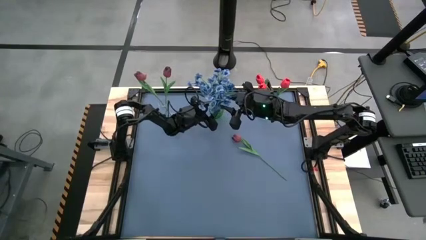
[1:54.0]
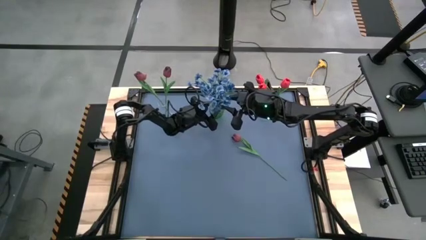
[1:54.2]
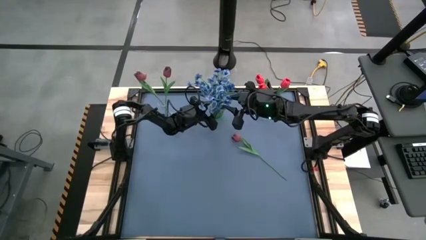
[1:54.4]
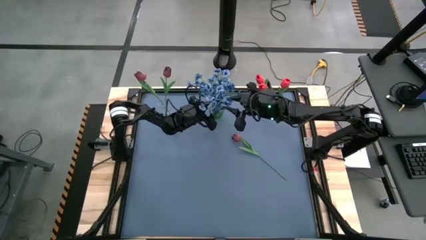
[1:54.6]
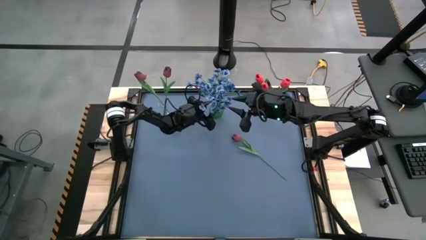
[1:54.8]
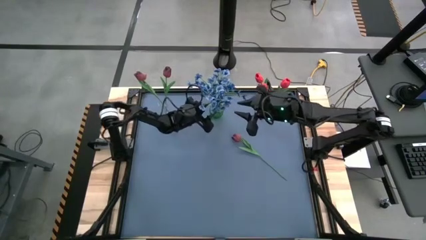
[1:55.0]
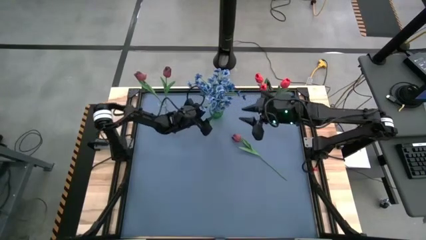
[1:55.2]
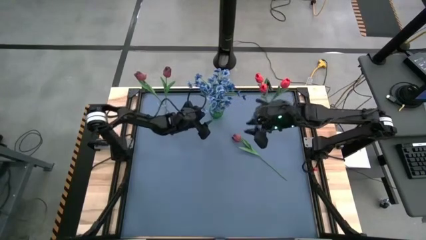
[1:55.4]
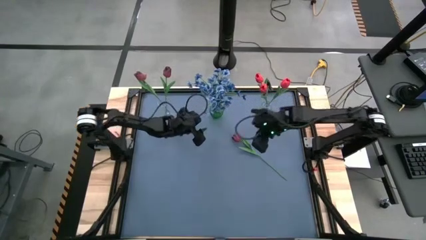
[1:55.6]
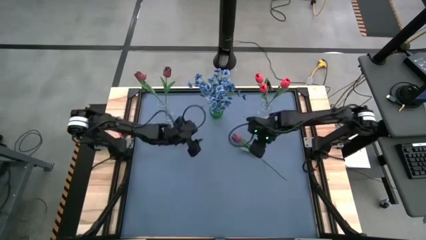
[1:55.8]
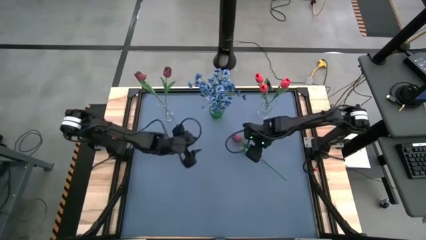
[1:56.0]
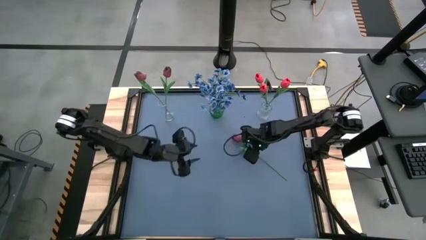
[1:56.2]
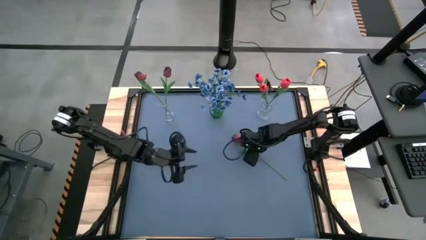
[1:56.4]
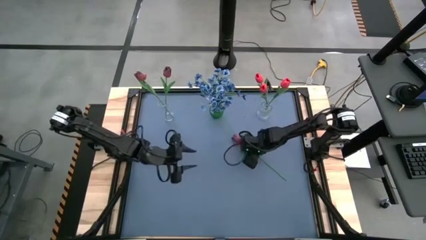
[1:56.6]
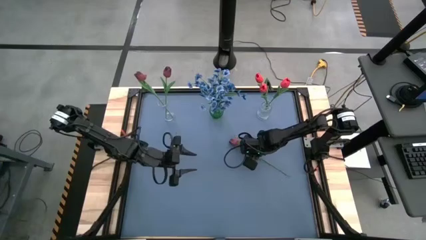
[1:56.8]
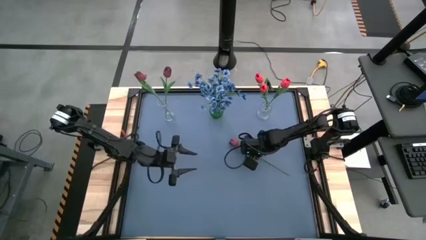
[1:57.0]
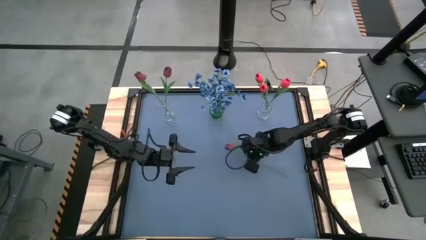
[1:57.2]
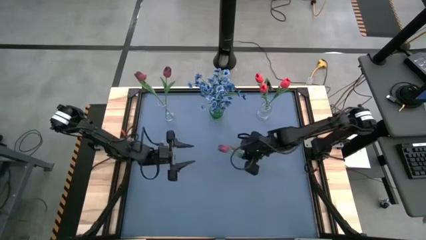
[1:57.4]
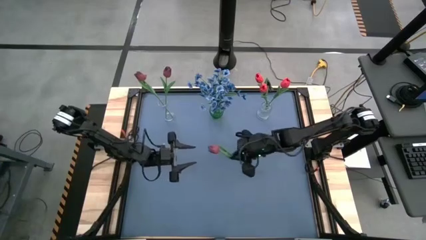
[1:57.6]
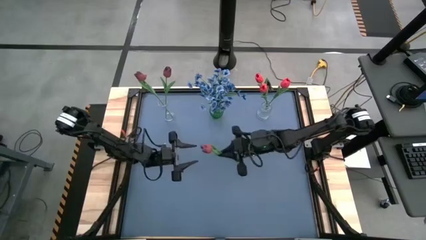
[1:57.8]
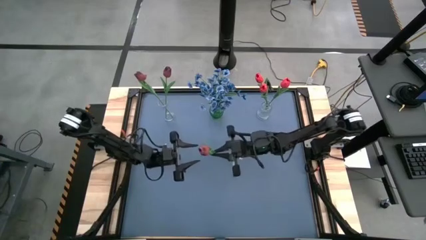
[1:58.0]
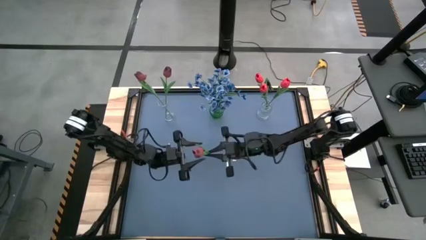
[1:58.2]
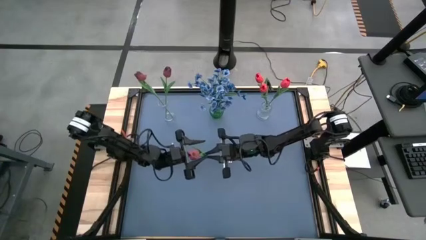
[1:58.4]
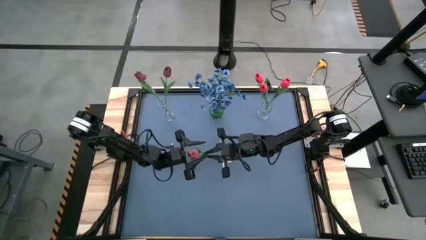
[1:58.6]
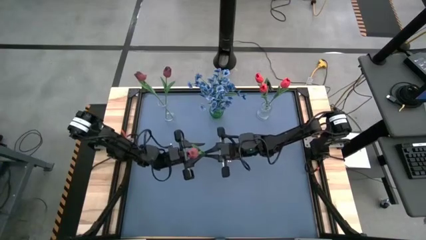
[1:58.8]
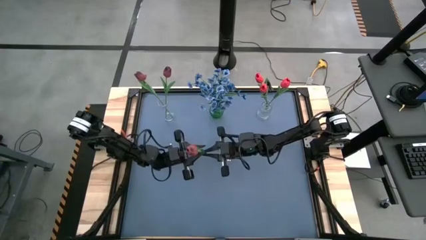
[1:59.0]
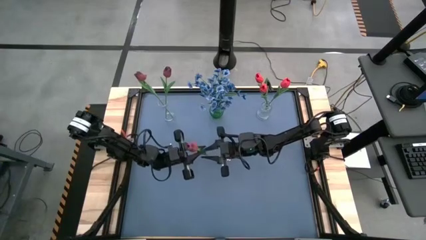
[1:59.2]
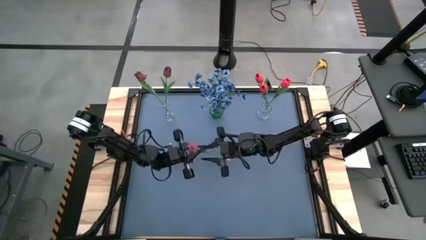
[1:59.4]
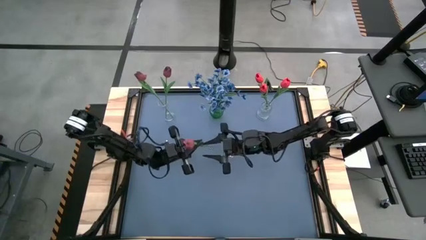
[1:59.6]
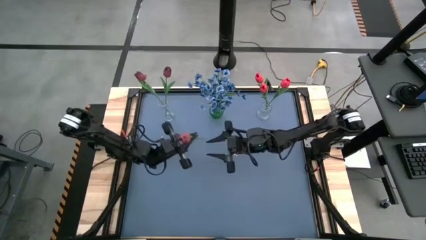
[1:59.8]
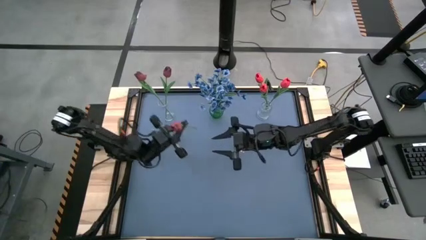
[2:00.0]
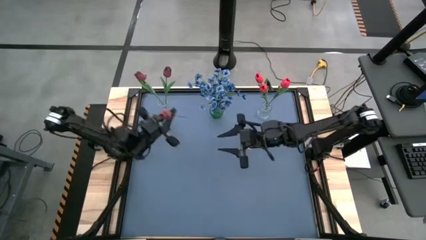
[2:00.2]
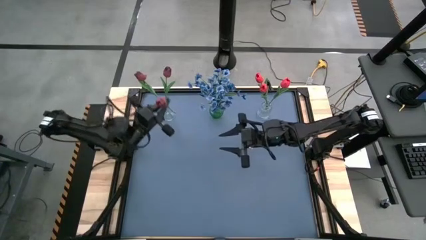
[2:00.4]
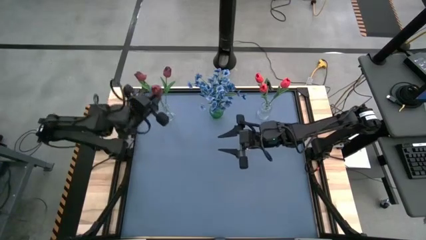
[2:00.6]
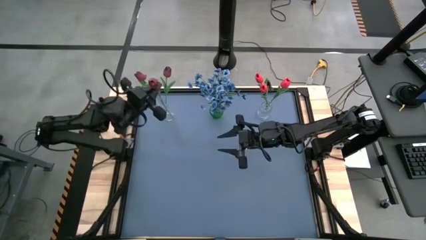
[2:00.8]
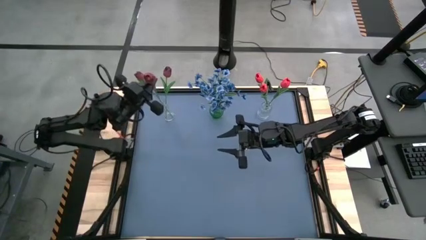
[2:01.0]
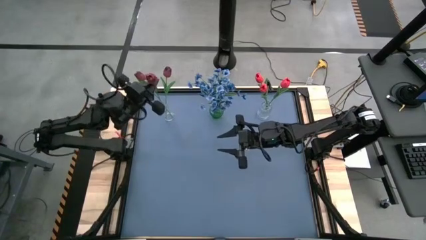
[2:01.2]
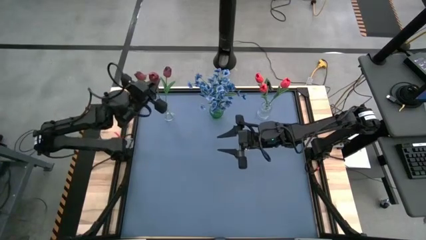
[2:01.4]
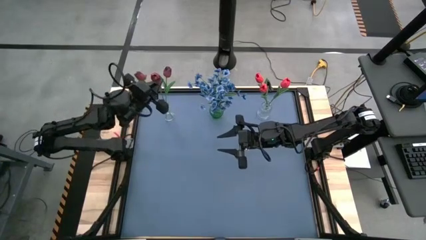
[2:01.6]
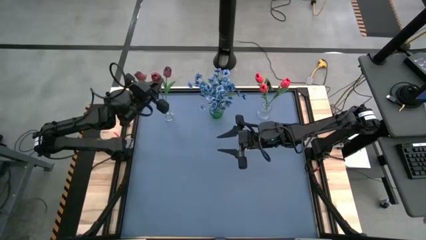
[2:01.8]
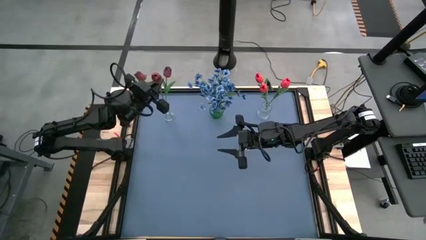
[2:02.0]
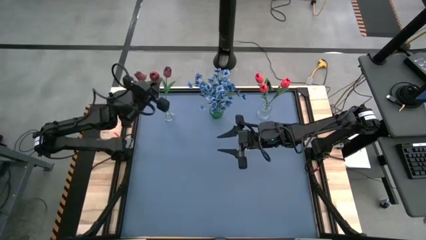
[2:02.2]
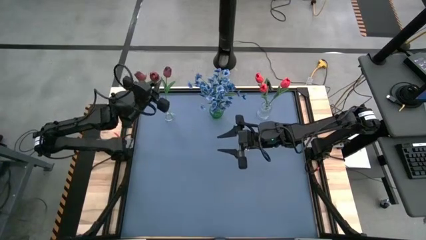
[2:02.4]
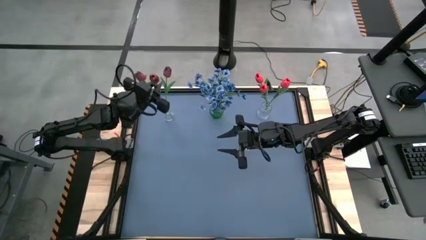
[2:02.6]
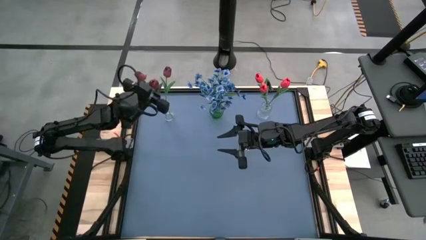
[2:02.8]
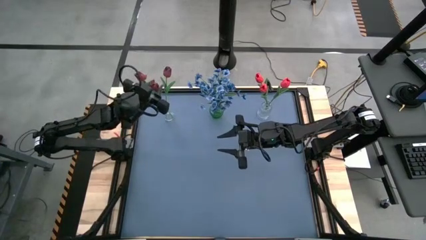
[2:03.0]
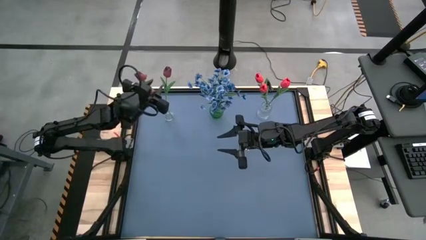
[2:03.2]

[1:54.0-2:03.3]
Task: Sort flowers into vase by color
Put the red flower into the left transparent vase

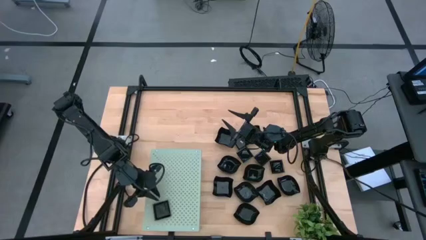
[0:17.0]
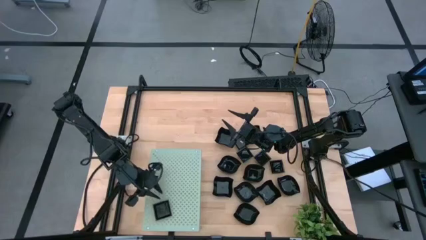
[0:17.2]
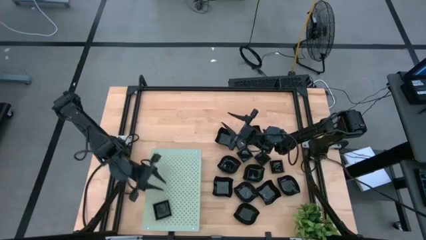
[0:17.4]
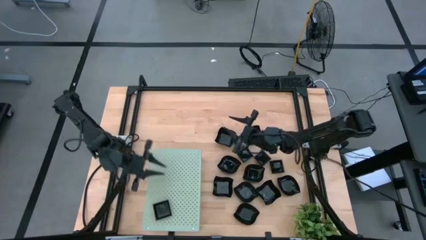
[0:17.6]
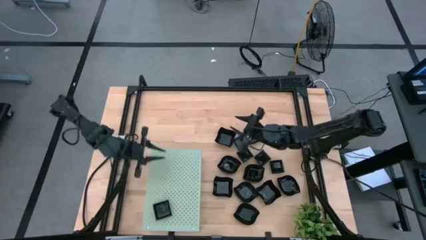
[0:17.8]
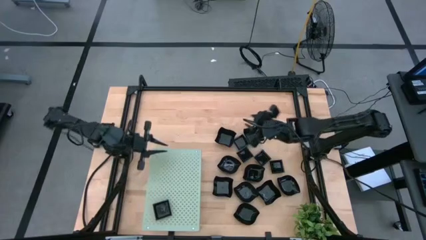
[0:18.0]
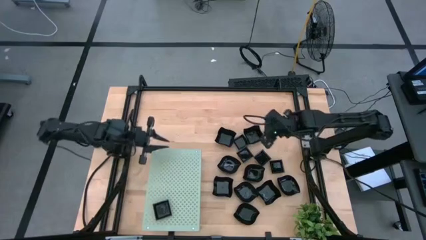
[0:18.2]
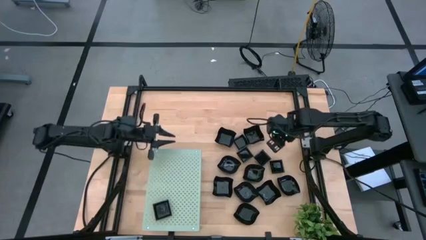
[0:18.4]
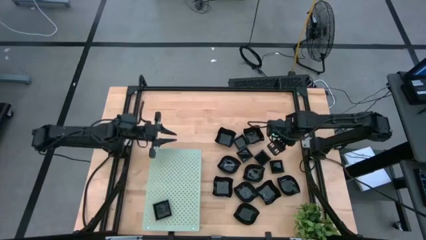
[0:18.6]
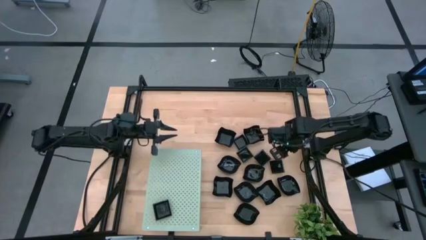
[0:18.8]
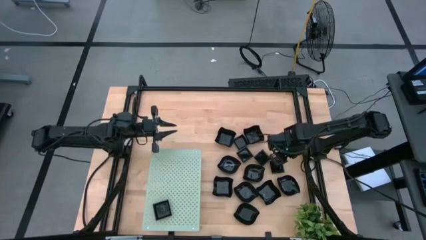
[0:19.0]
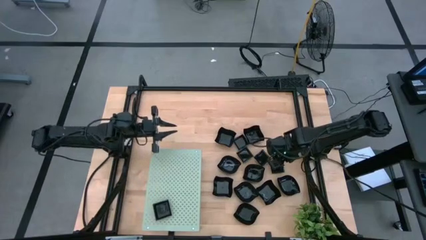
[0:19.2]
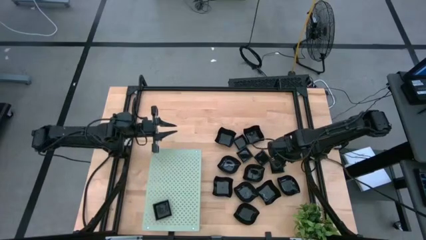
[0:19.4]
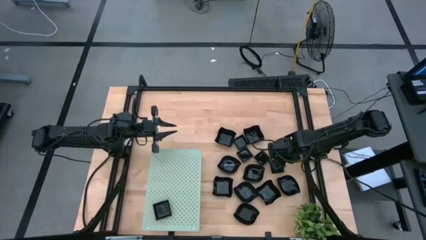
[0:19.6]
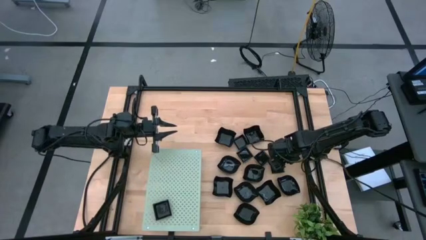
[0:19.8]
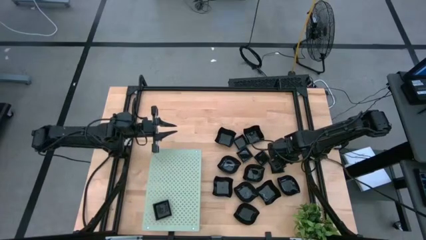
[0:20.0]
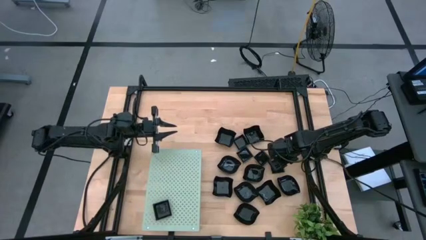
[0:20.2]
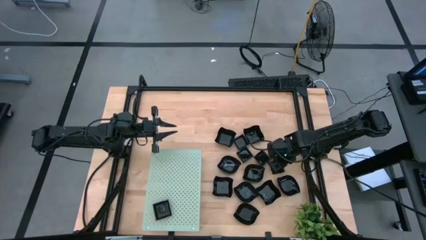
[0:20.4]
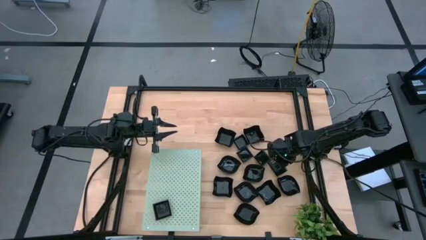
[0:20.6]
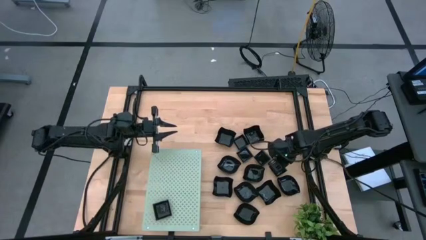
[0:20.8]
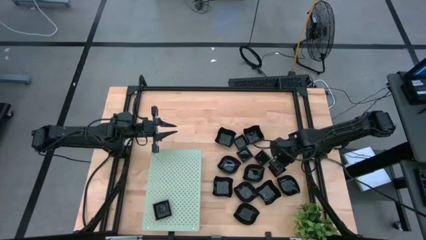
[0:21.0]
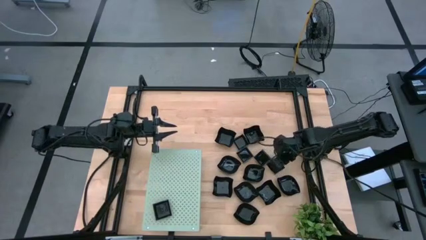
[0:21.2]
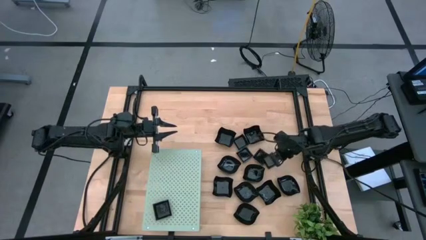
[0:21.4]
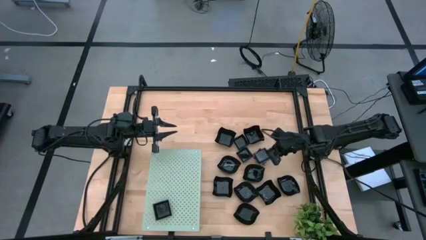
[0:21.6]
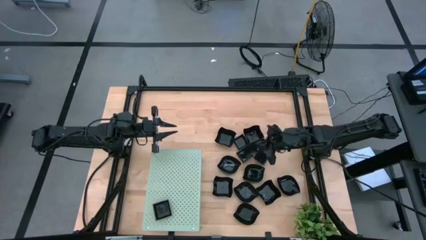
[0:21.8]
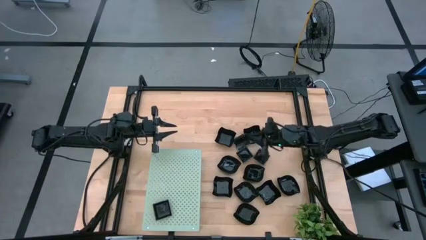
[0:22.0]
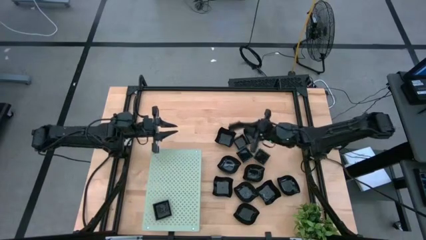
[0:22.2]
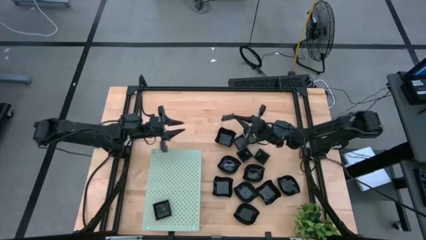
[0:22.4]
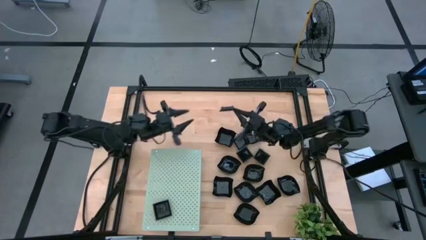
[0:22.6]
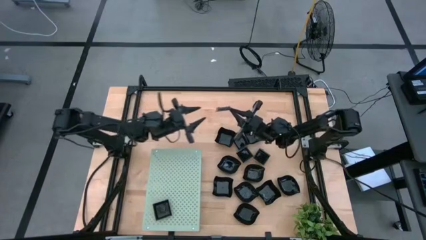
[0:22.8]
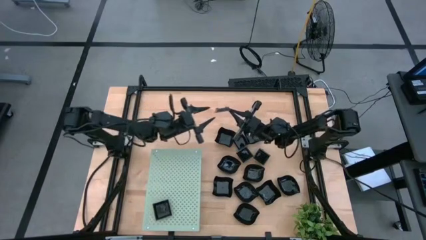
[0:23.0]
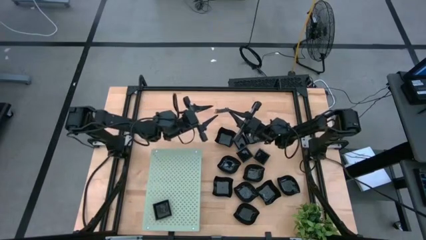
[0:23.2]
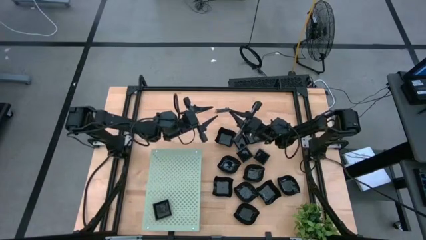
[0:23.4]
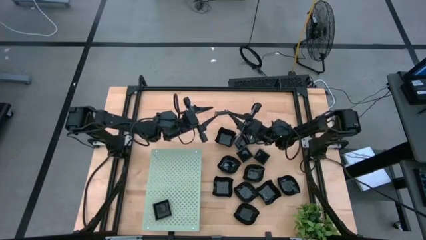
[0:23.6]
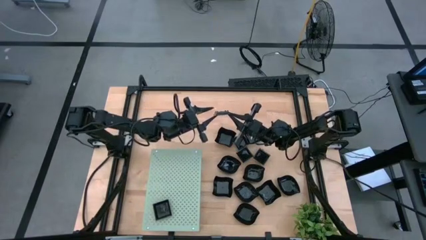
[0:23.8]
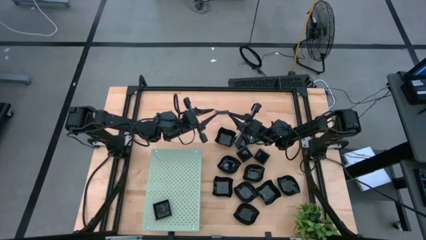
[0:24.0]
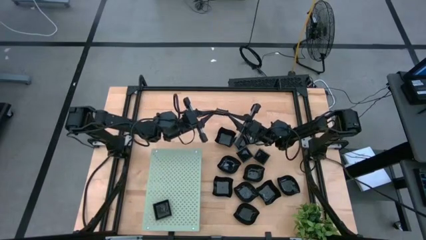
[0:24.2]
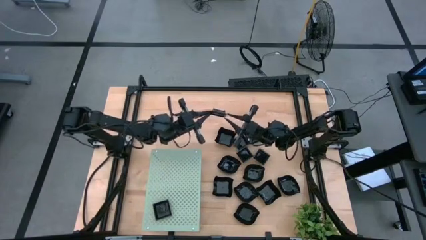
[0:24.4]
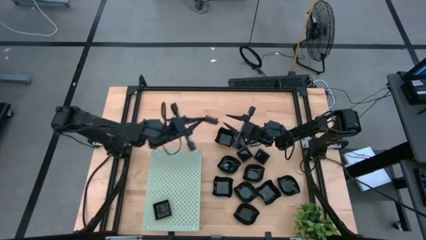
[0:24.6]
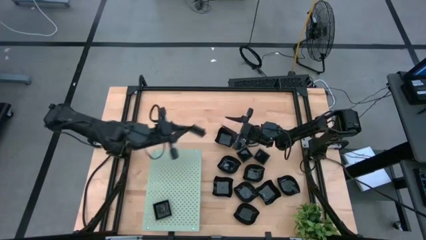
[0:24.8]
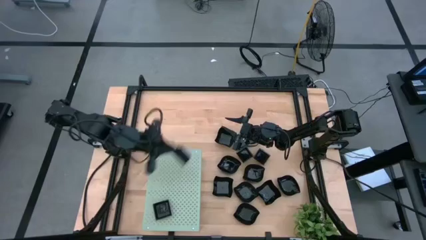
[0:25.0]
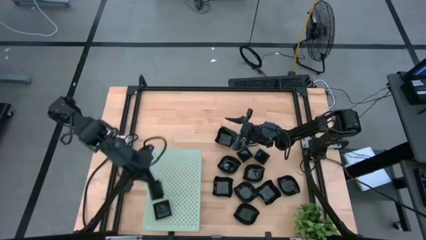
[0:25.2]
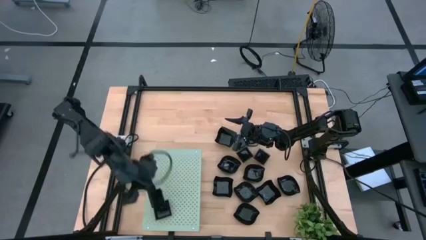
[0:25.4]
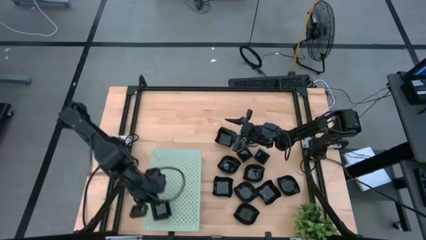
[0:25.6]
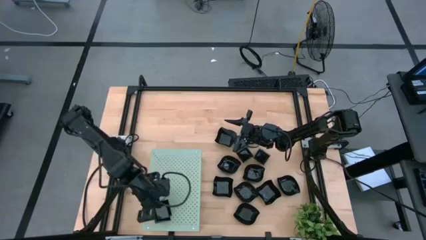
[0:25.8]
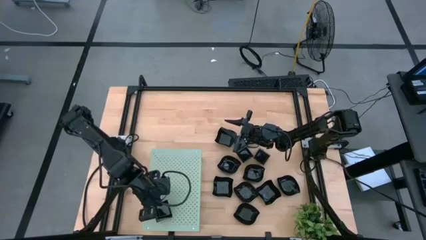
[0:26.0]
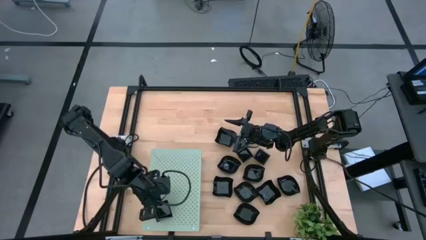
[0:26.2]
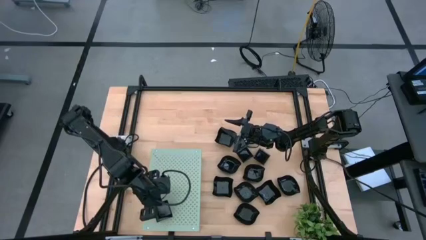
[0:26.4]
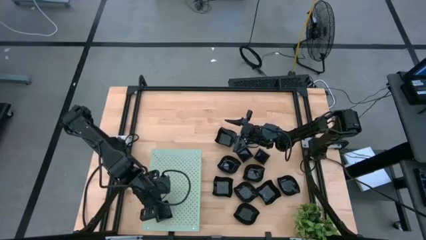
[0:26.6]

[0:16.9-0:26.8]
Task: Pick & Place Mini shaped plates
Stack the square plate on top of the other square plate on the shelf
